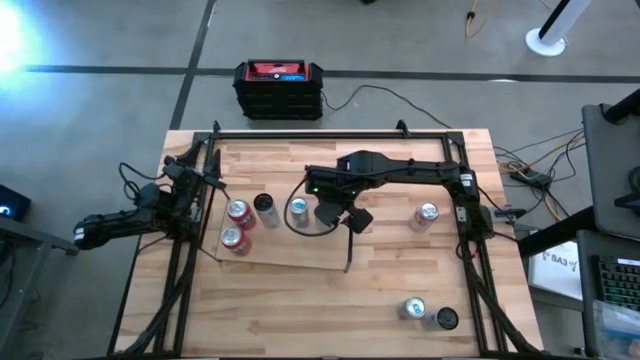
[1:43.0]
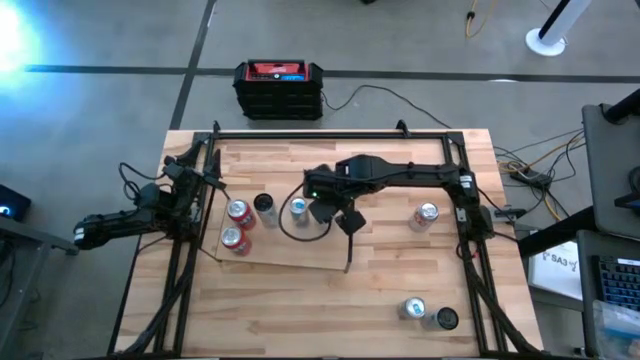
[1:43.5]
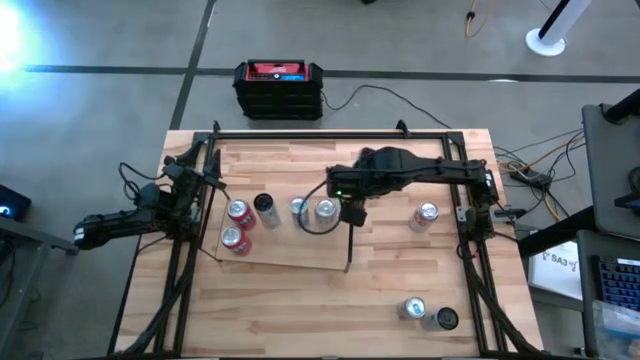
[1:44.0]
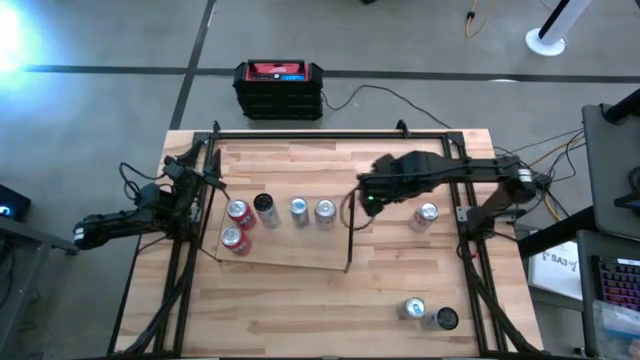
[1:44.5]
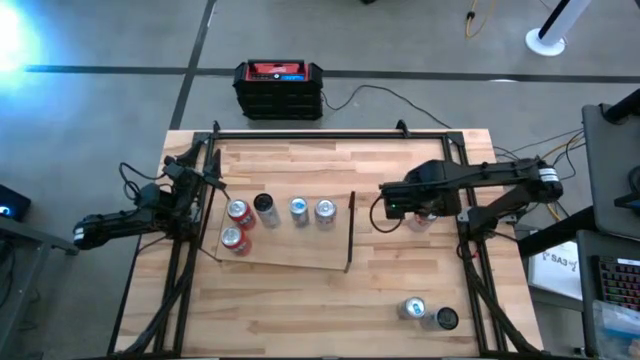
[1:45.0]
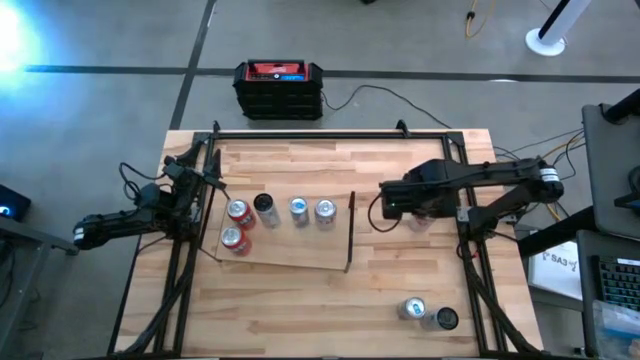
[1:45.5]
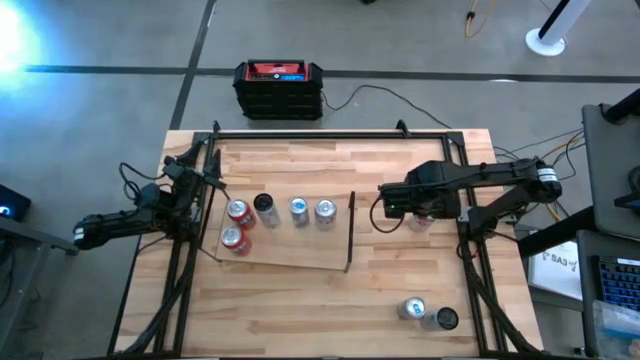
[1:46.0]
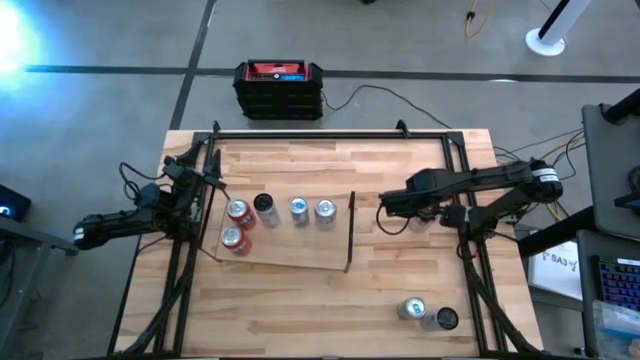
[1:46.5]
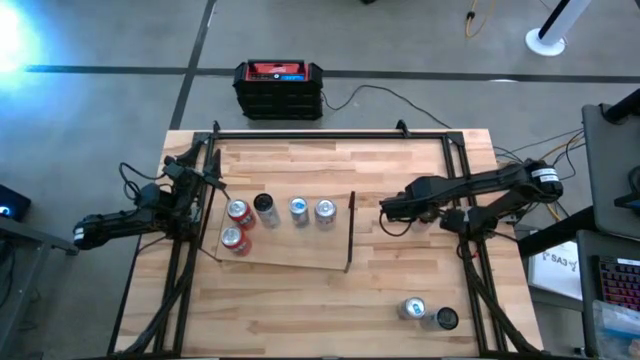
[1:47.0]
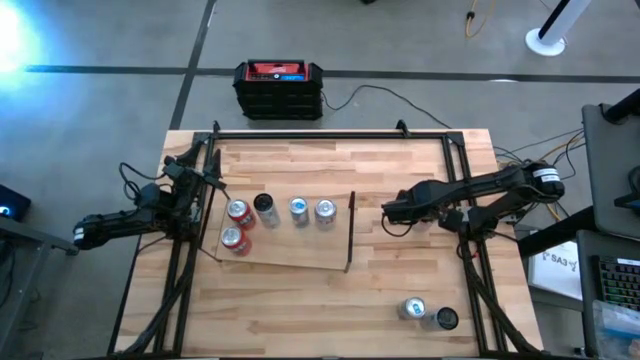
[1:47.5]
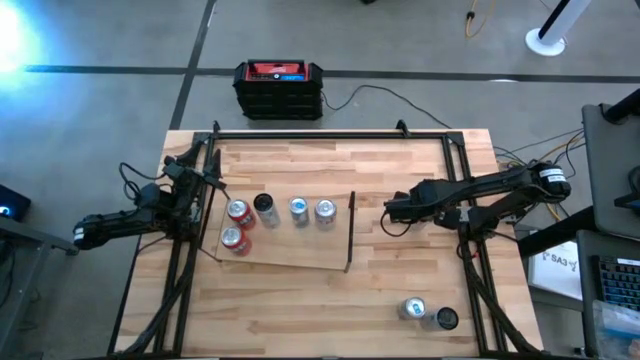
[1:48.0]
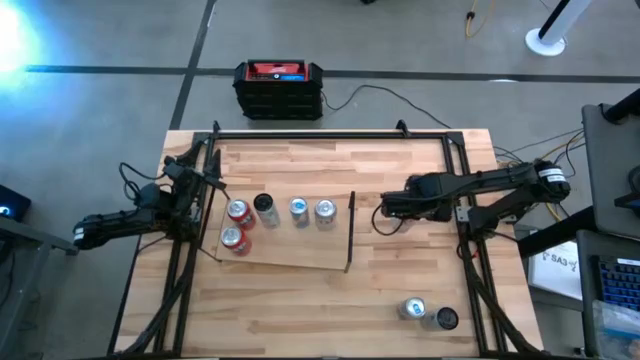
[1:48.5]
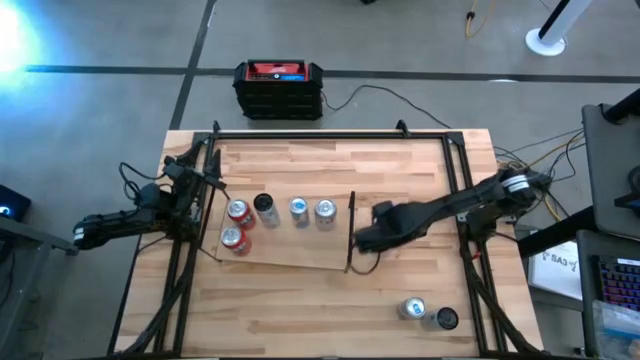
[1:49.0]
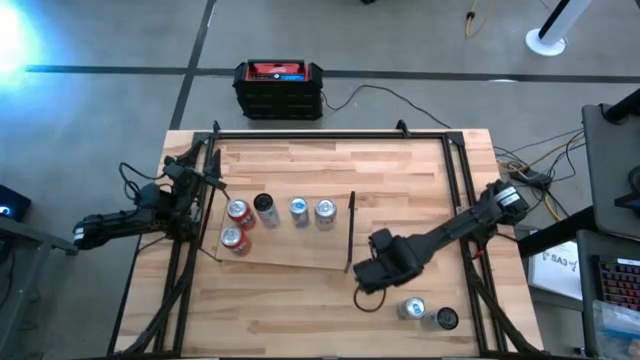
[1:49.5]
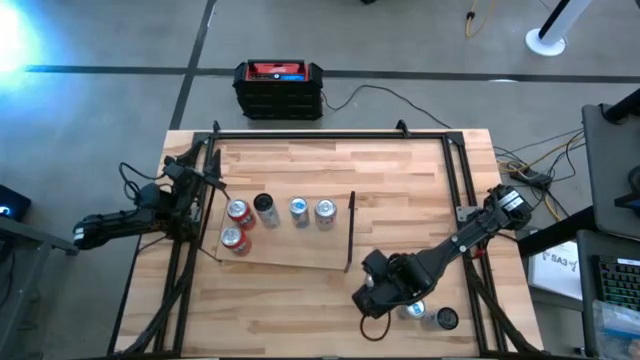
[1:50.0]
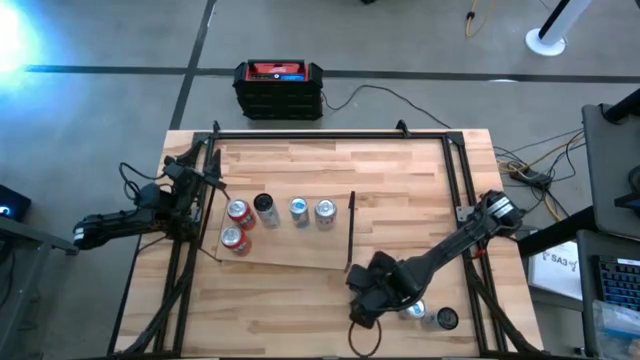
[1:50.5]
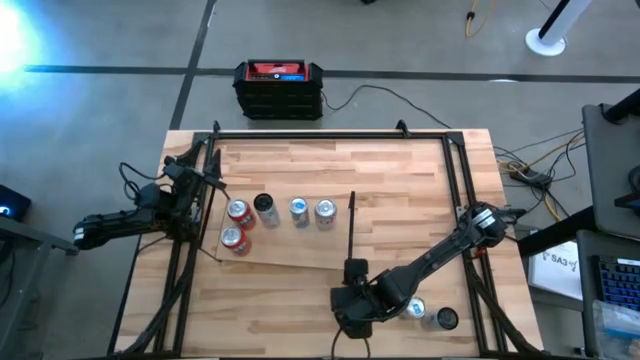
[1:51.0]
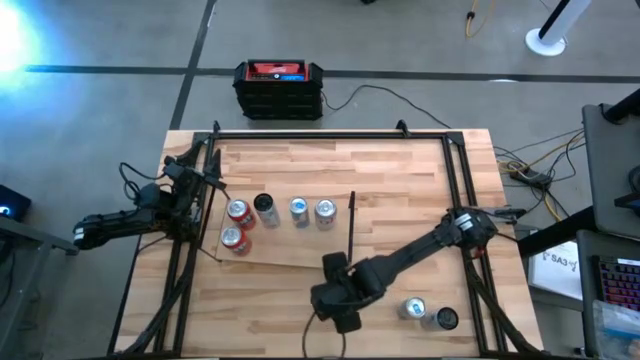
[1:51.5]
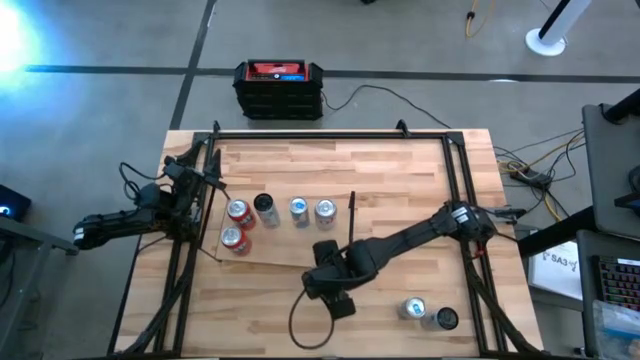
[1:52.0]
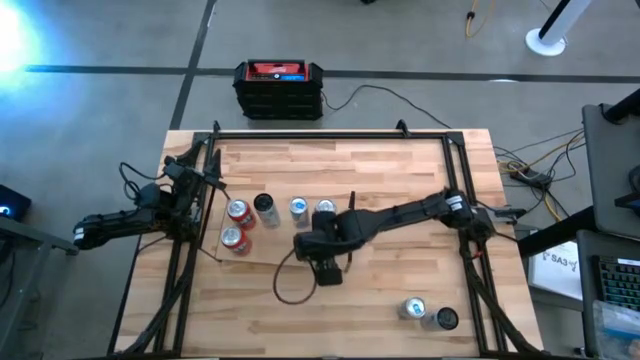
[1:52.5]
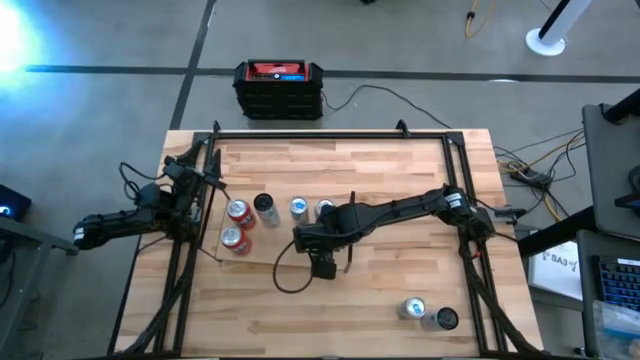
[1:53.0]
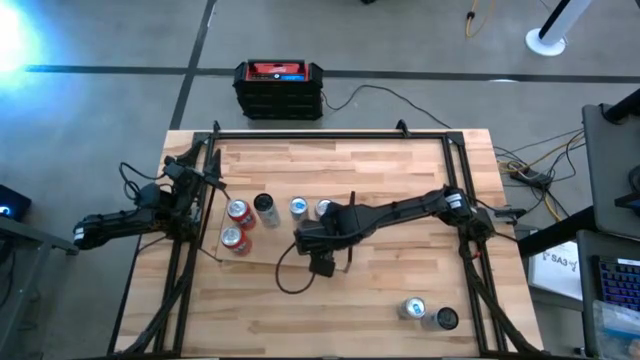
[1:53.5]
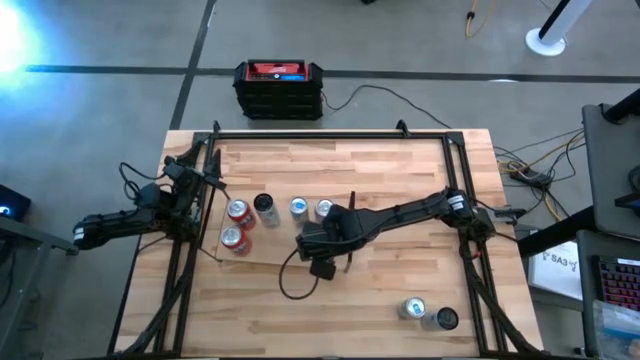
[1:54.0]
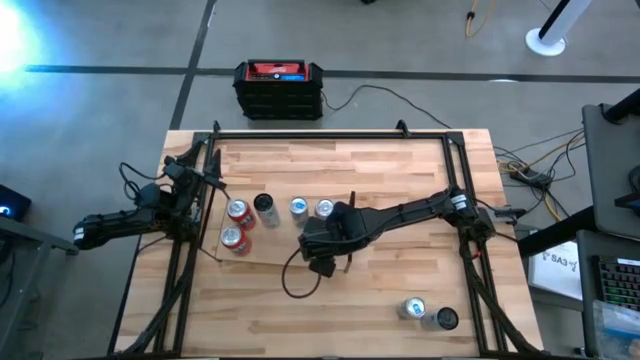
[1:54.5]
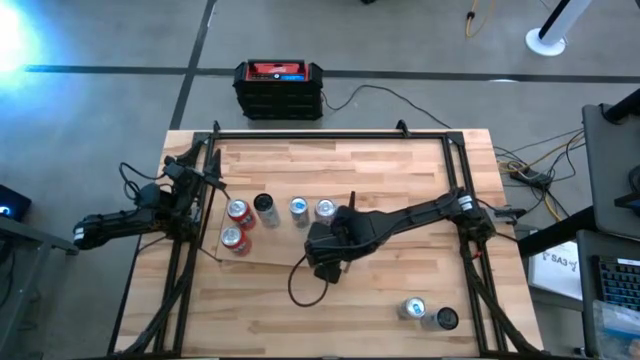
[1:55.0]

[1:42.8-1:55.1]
Task: Place canned beverage on shelf
Put the silver soda can on the shelf aligned with the other silver soda can

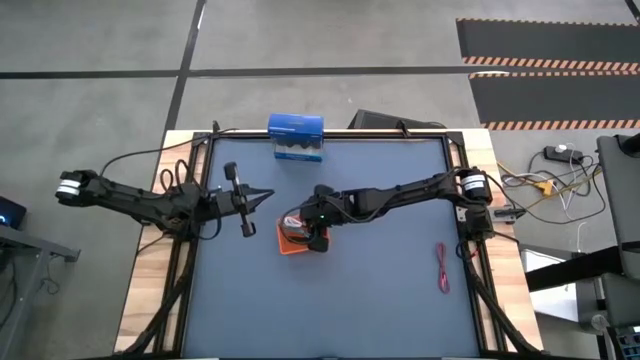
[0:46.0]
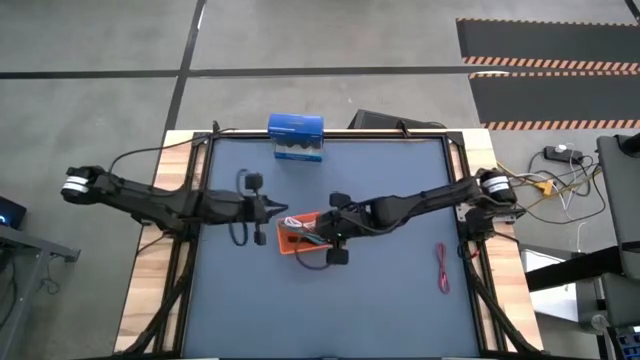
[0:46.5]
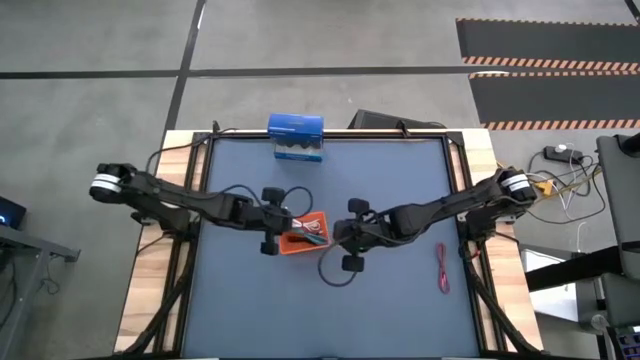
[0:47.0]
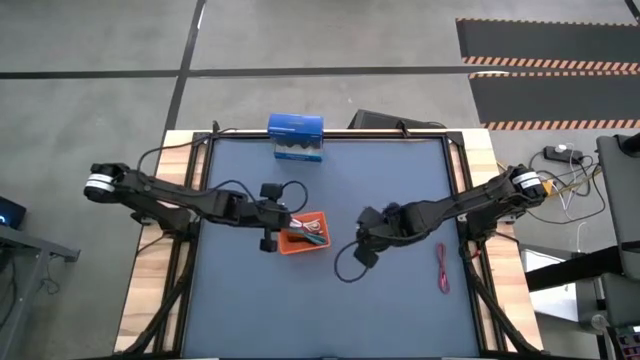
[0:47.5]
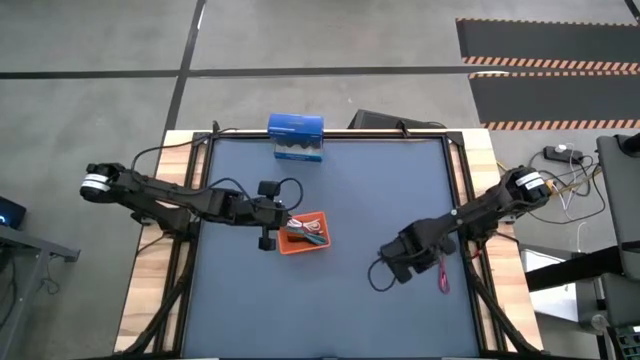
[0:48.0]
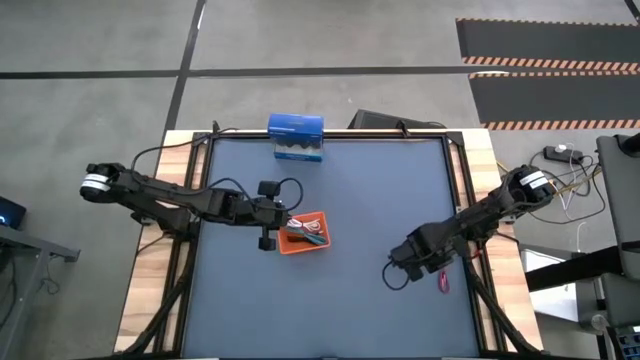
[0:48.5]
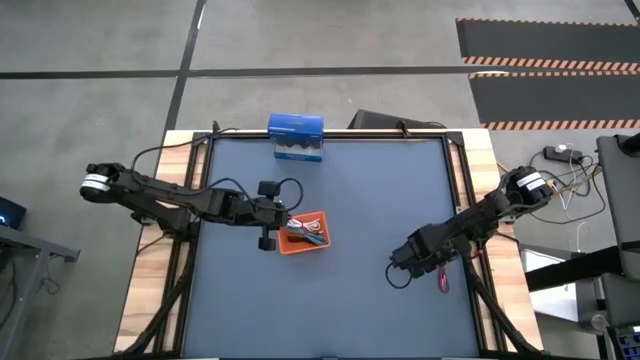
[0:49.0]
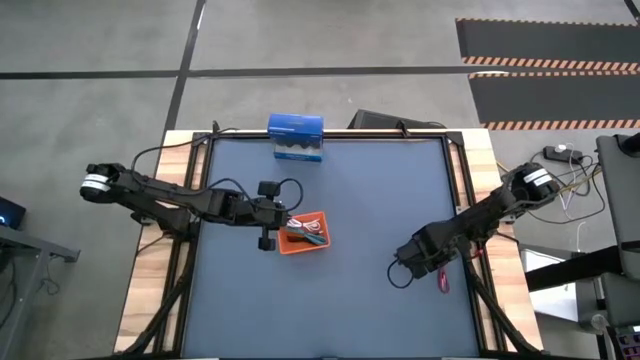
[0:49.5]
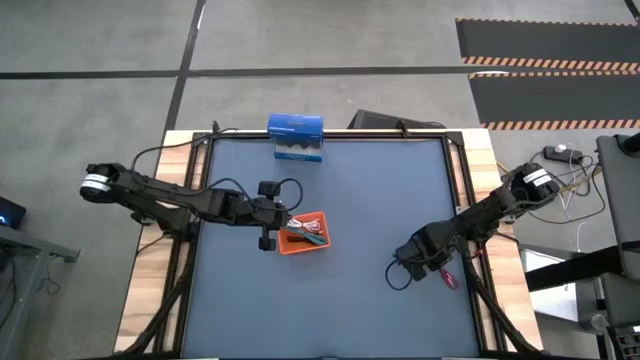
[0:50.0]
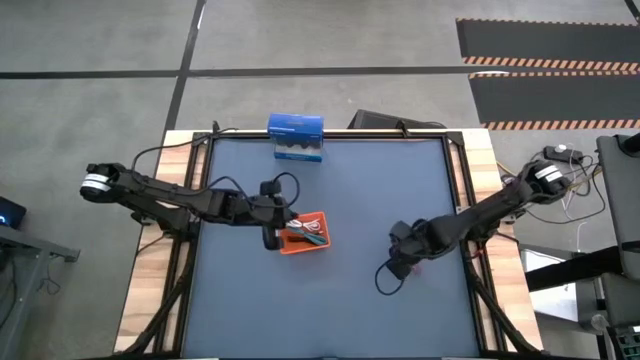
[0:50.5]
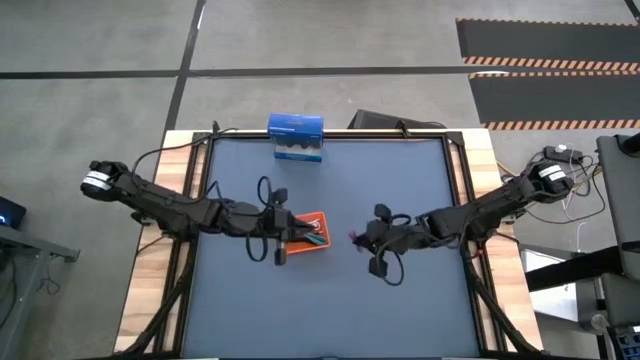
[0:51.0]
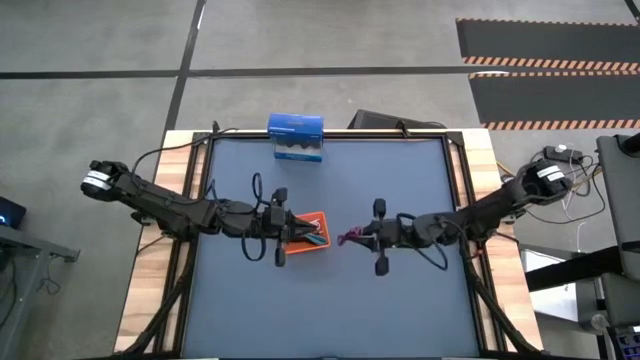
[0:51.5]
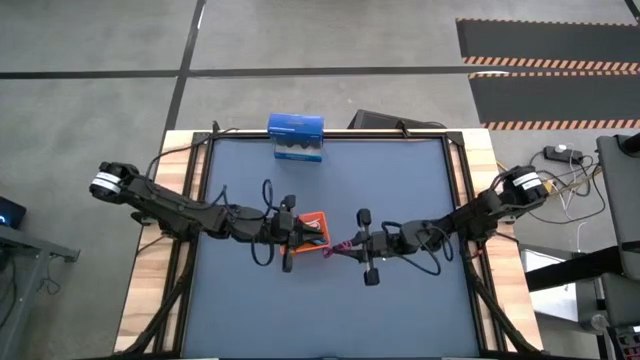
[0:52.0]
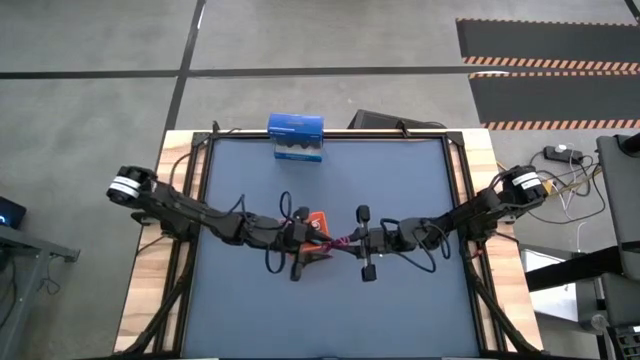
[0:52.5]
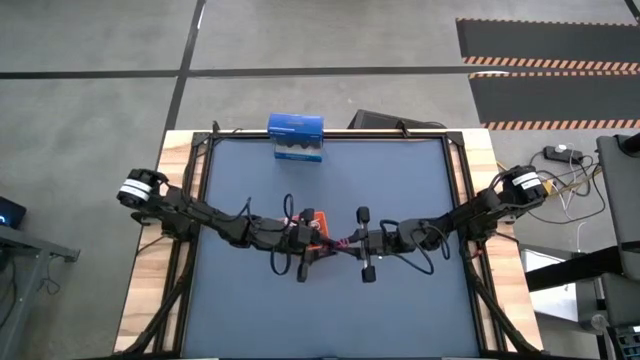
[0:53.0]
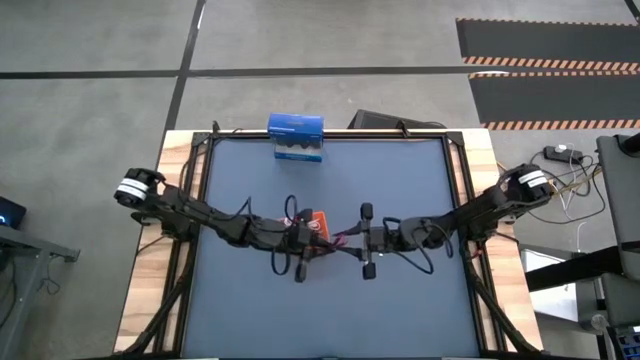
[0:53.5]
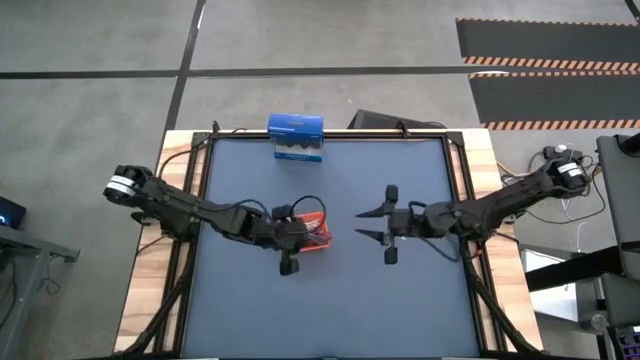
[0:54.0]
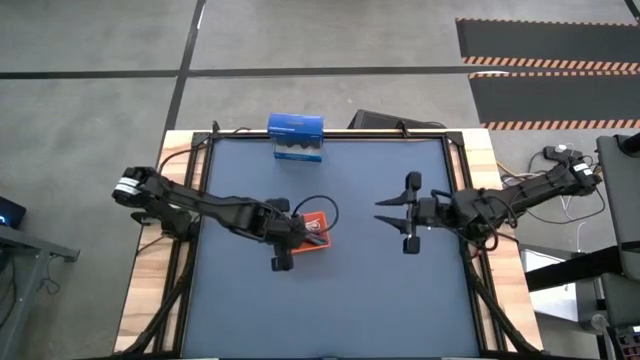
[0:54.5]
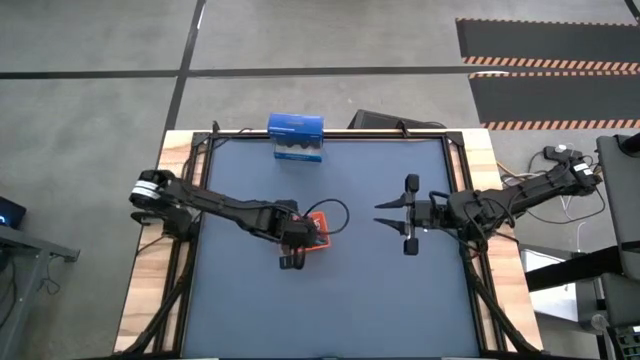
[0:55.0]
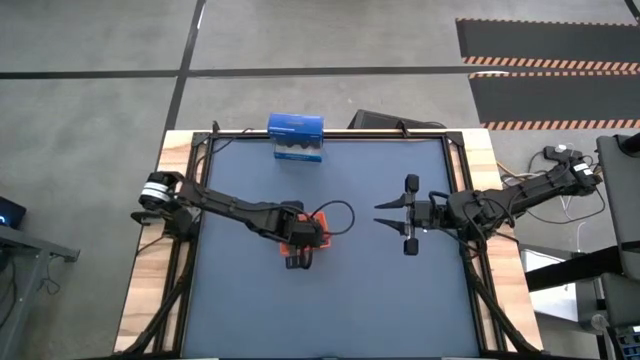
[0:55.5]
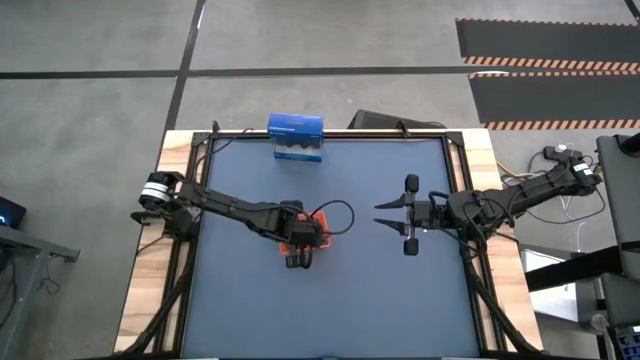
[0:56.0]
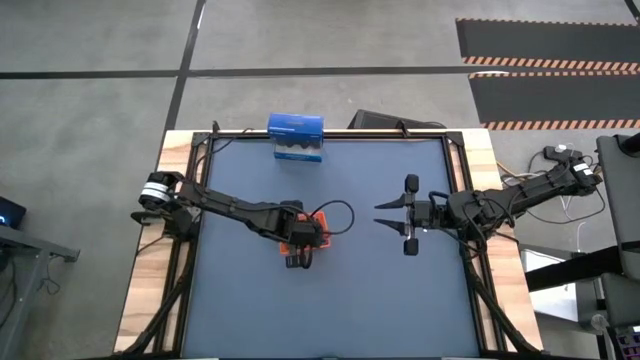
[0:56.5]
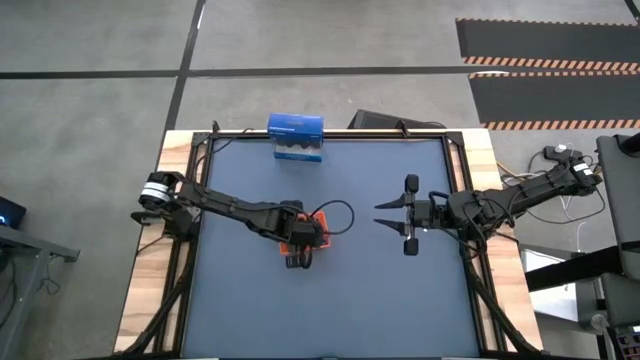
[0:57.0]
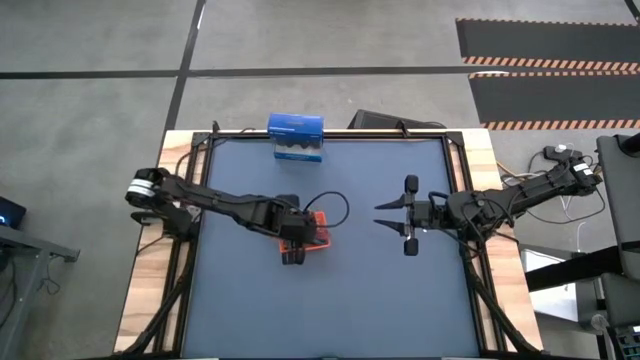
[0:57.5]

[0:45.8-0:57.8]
Task: Pick and place USB-C Cables
Put the red charger cable into the orange bin
